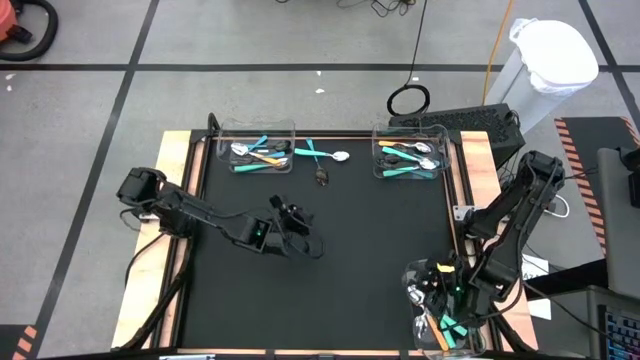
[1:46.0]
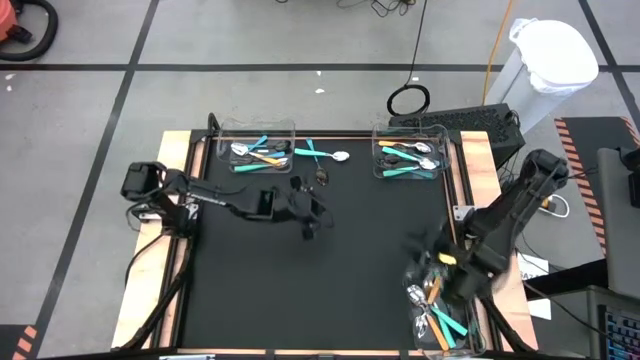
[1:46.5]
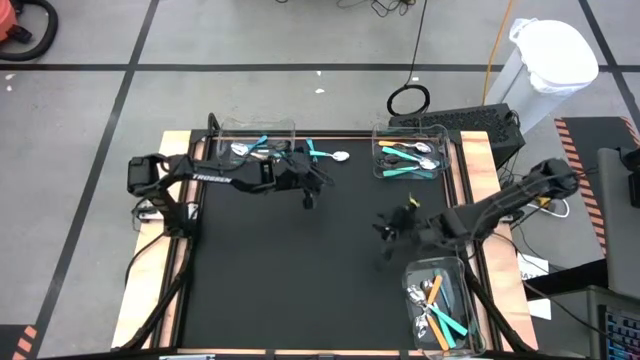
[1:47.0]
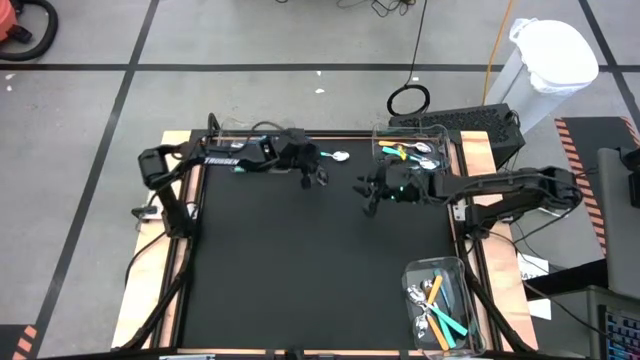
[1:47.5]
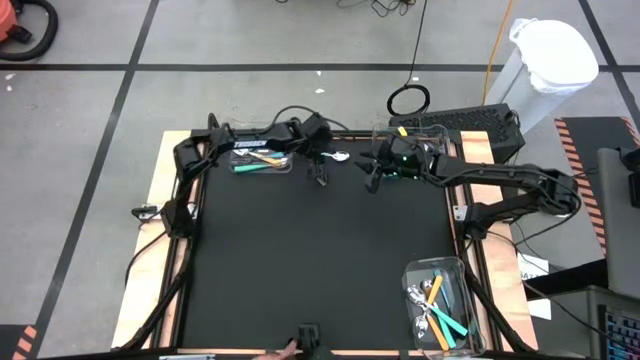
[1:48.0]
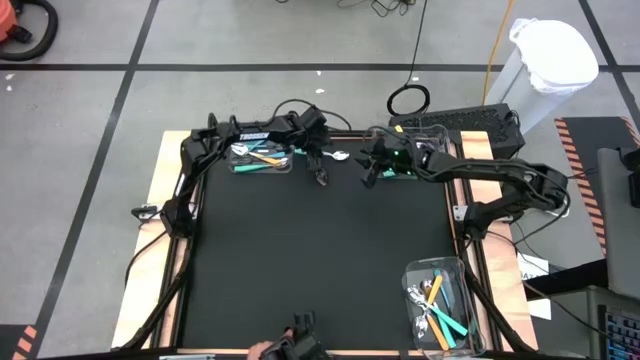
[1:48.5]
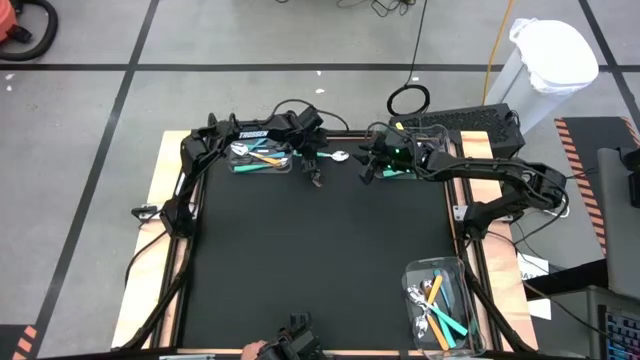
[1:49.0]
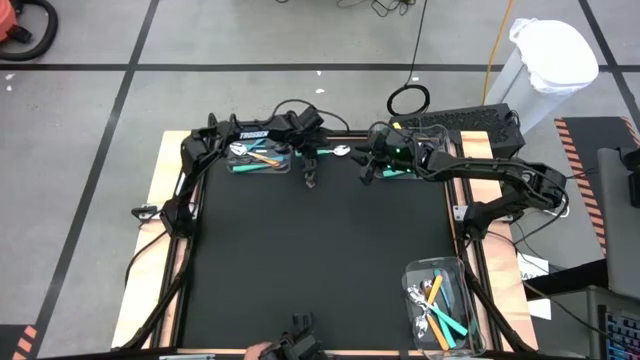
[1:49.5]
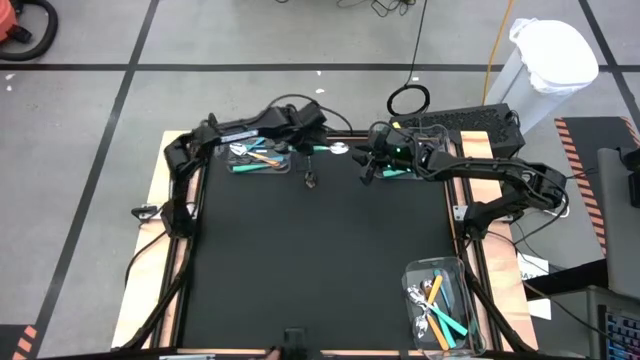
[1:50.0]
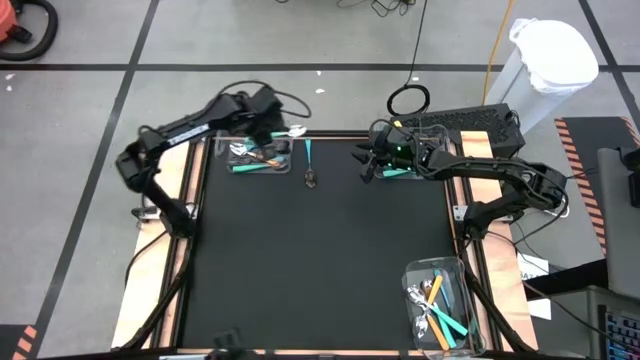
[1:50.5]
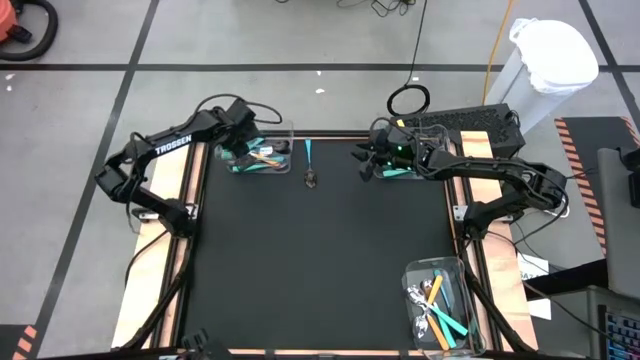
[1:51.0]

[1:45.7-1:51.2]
Task: Sort silverware by color (type)
Put the light blue spoon into the top left transparent bin

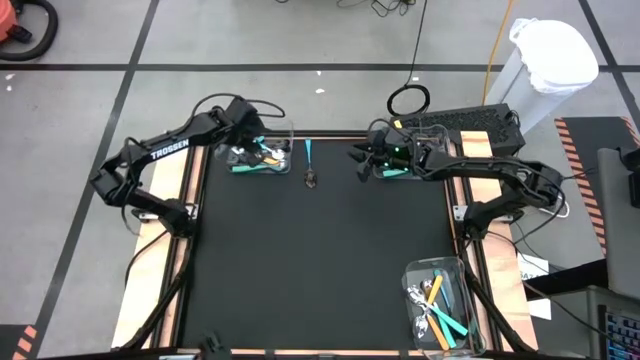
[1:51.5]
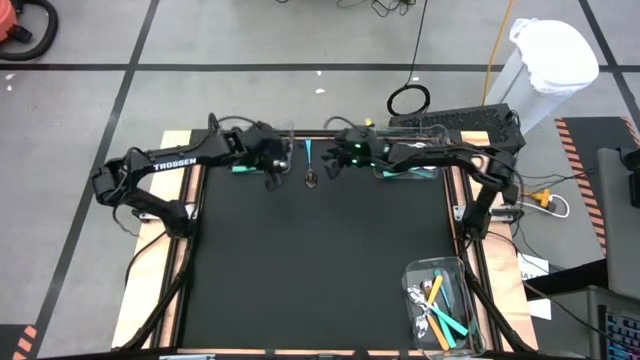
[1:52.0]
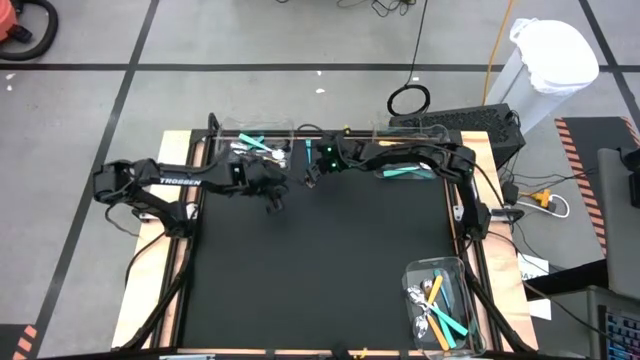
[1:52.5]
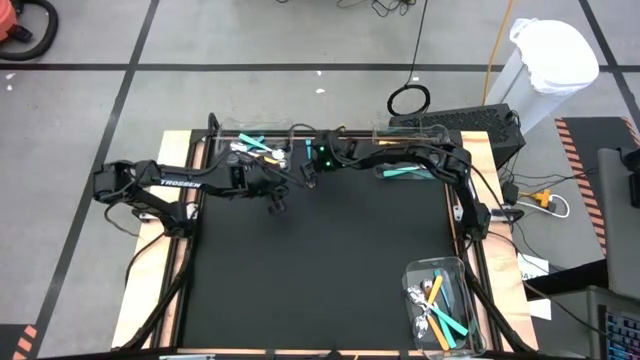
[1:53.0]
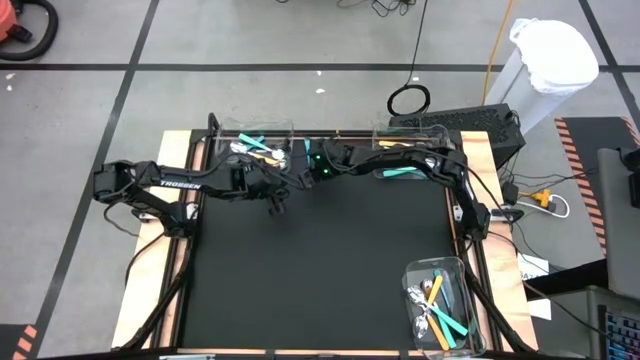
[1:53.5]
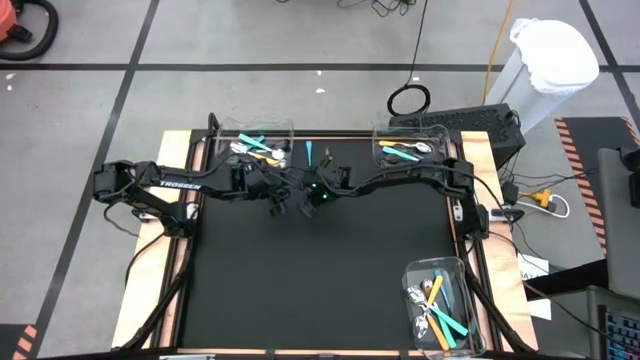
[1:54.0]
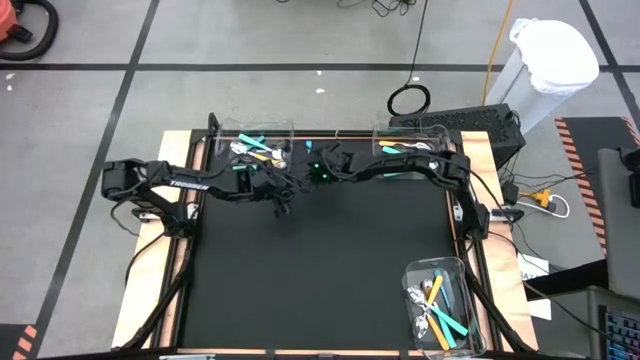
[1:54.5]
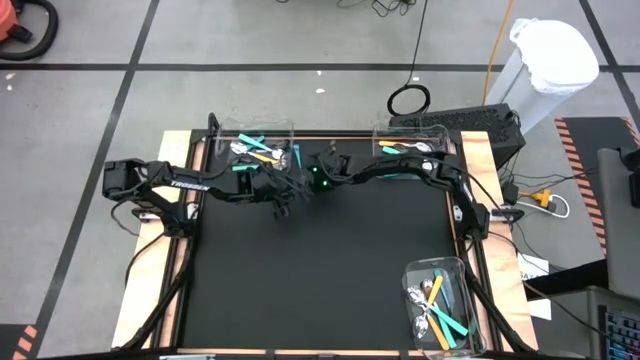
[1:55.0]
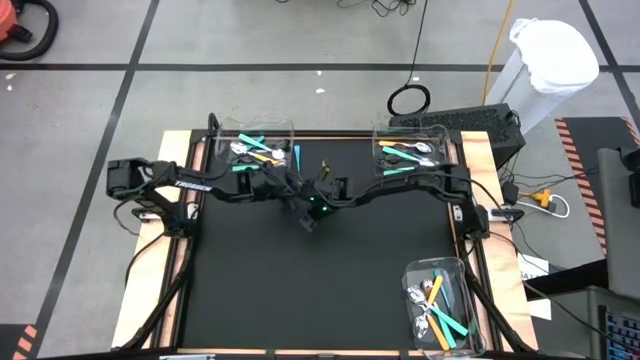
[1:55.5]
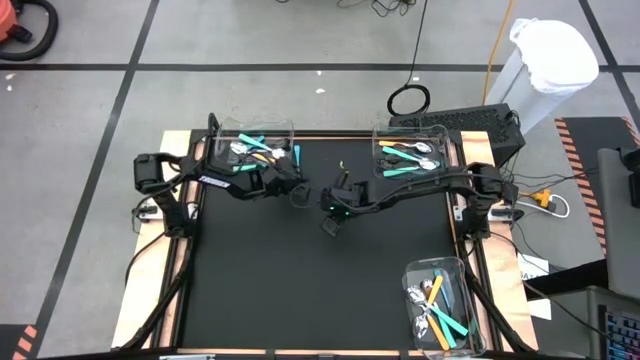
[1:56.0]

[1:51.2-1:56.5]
Put the blue spoon into the top right transparent bin

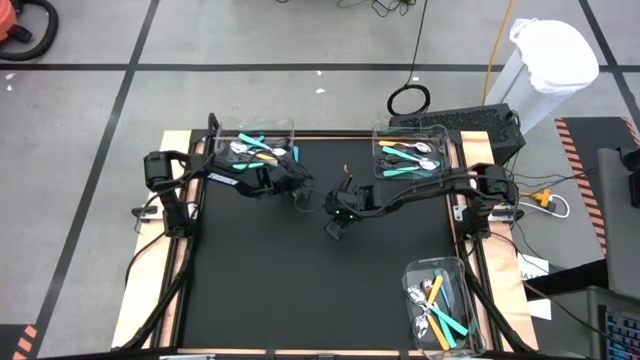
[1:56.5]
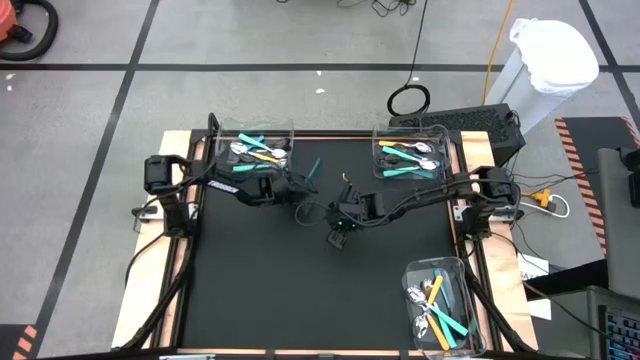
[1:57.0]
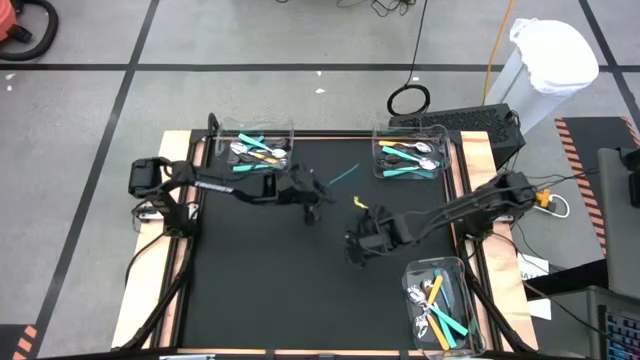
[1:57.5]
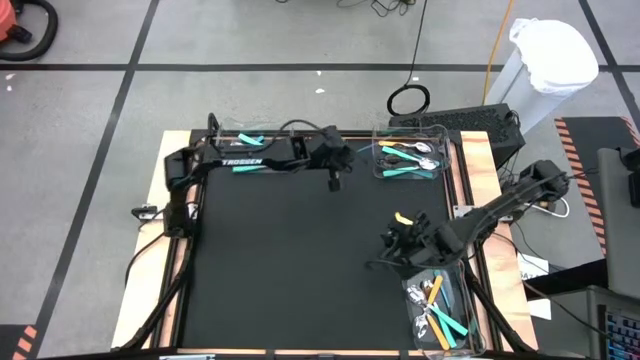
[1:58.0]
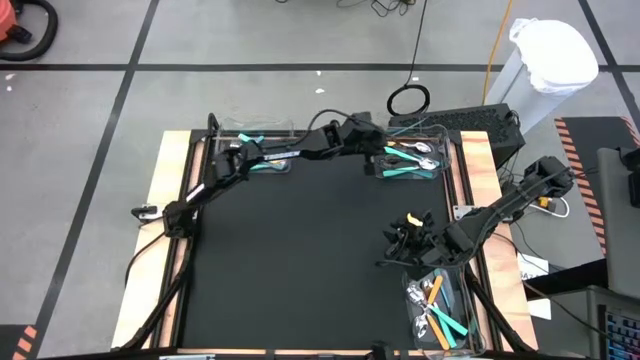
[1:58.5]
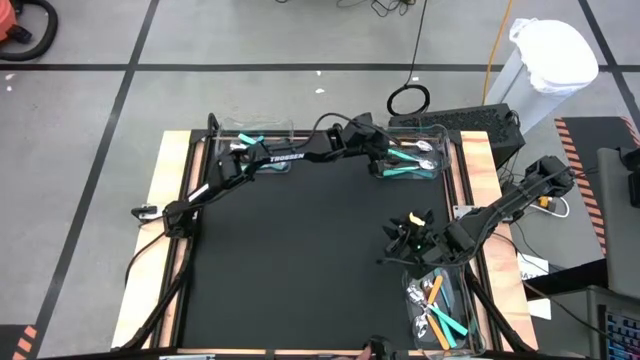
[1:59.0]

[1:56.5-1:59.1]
Put the blue spoon into the top right transparent bin

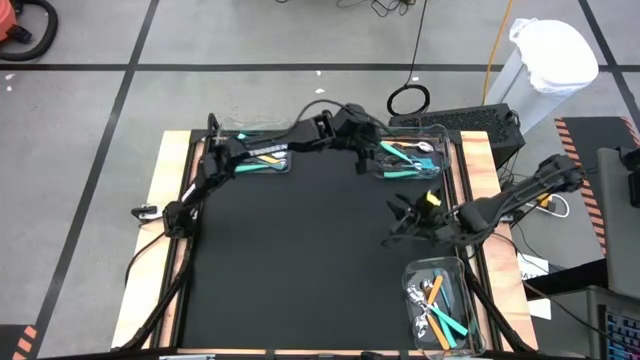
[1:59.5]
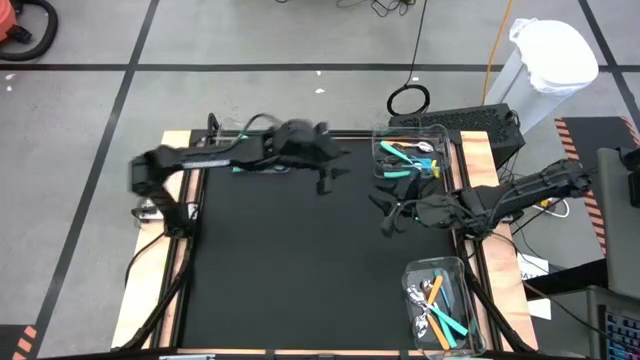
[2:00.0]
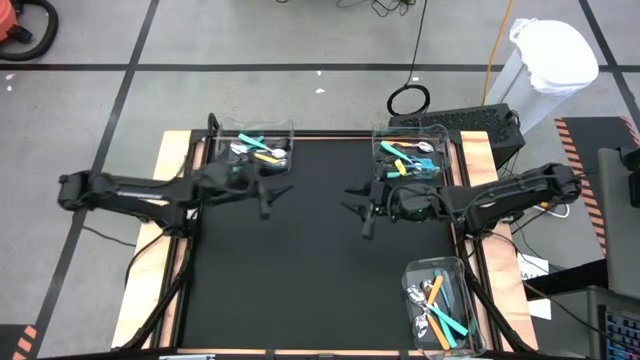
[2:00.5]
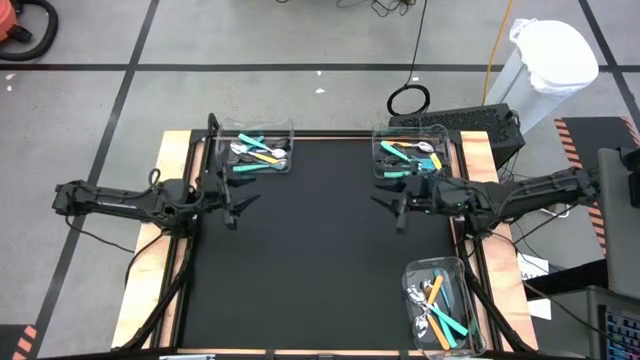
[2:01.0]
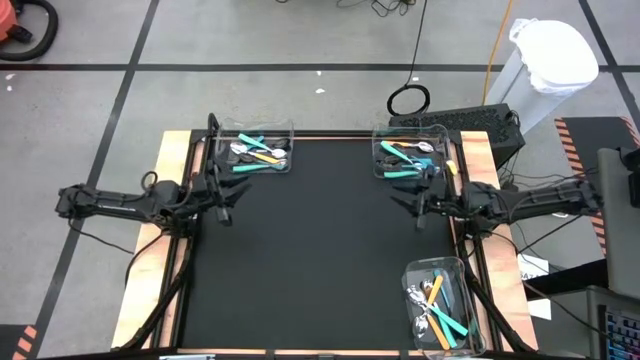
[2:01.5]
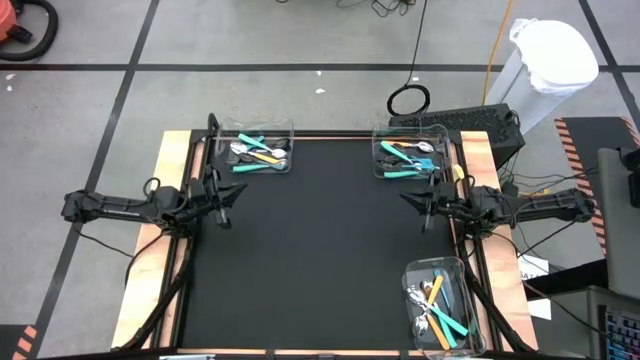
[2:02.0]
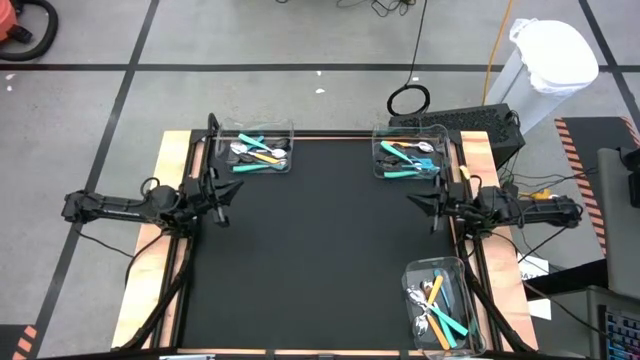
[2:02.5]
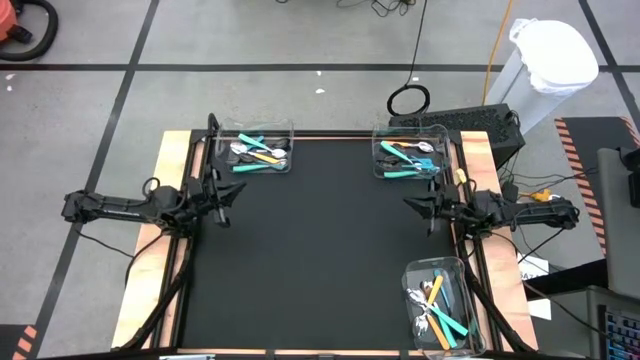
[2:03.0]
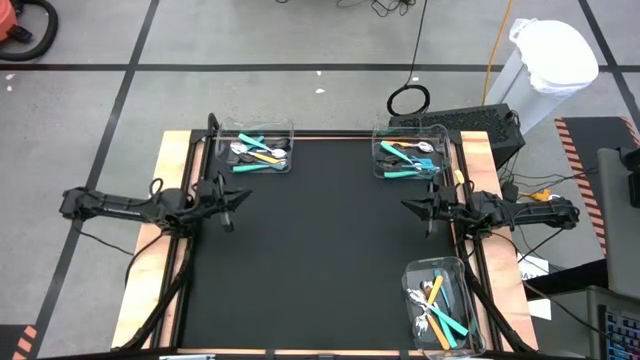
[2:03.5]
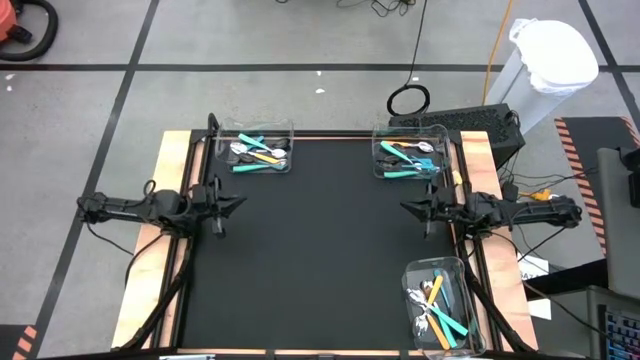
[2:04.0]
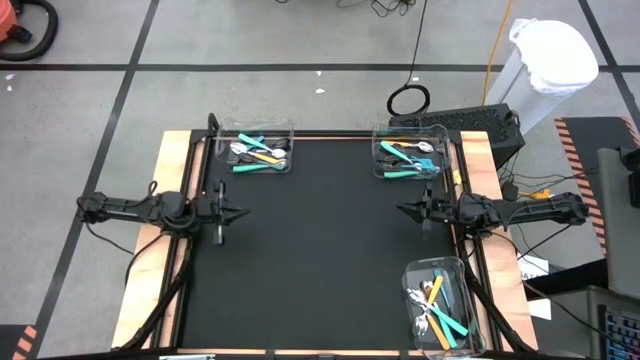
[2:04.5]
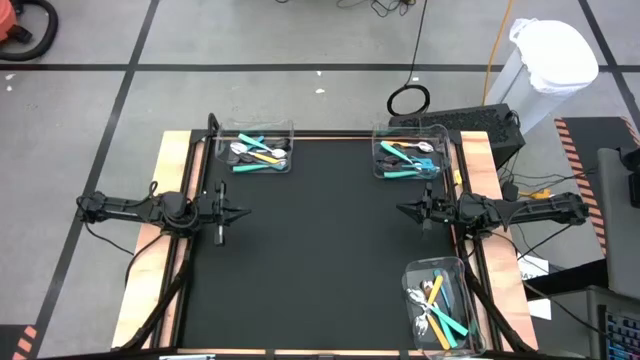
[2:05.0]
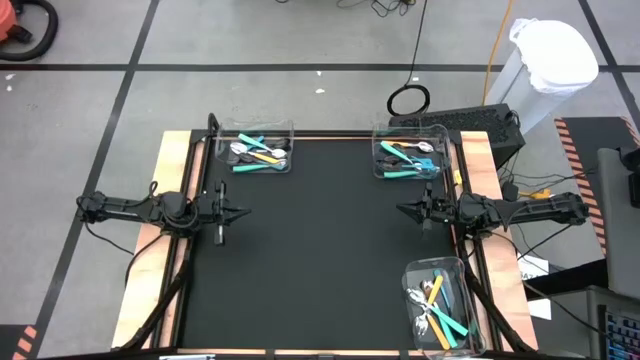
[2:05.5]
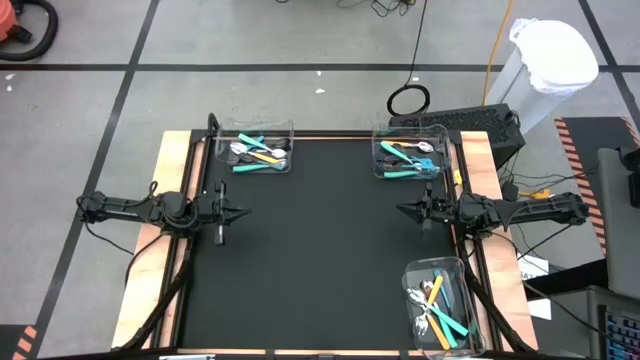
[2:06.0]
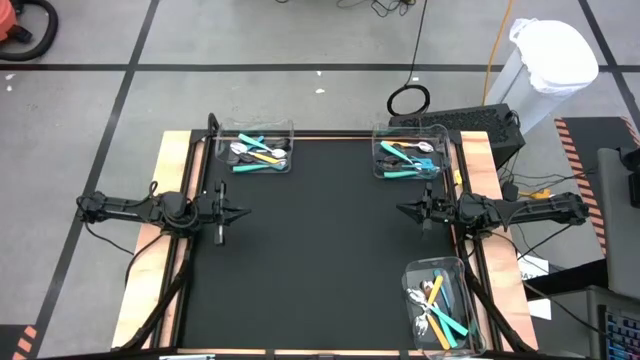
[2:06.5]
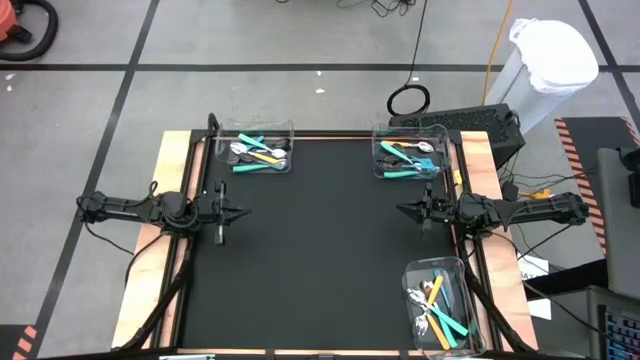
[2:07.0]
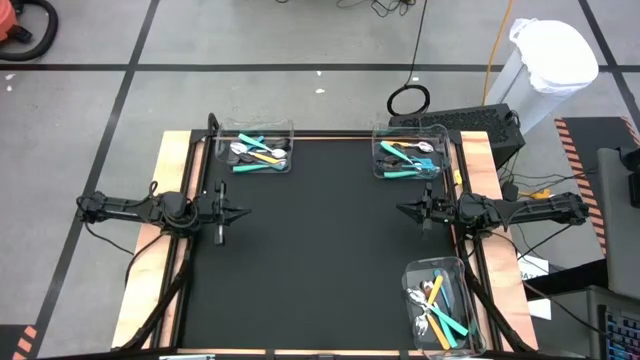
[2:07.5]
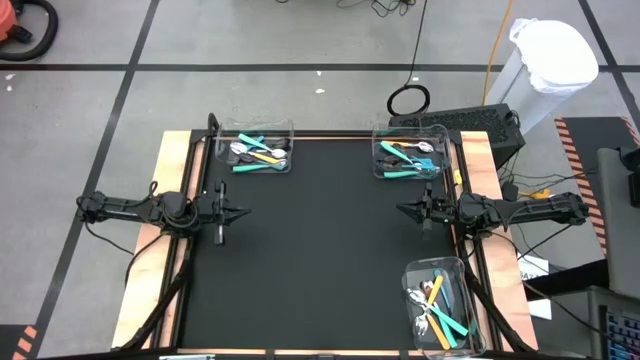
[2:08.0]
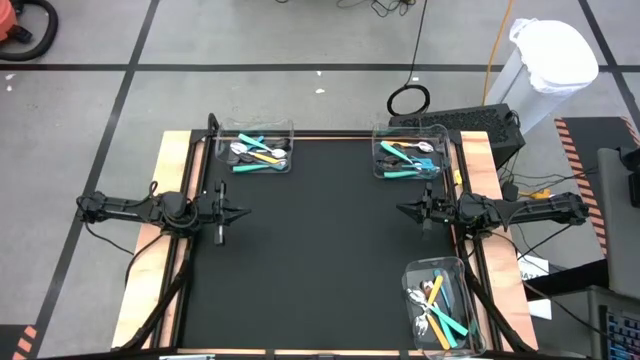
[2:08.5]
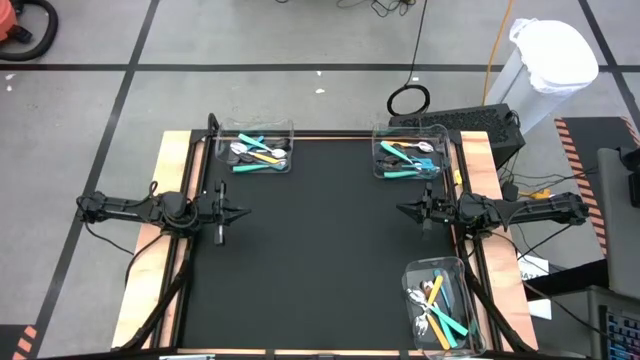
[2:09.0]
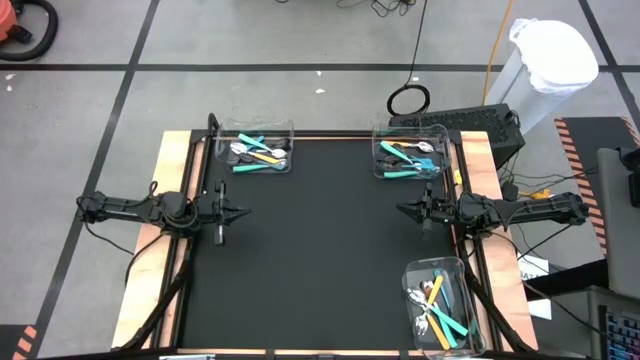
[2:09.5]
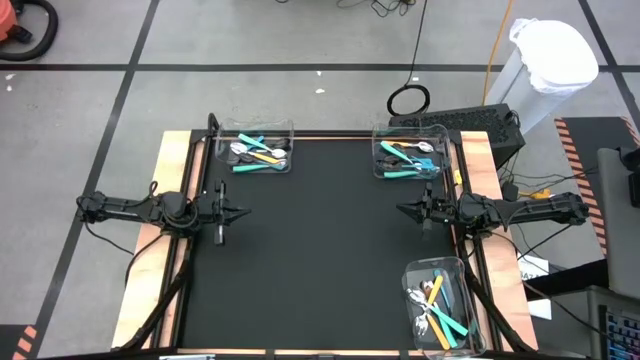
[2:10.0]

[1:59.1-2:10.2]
Return to Home Position
